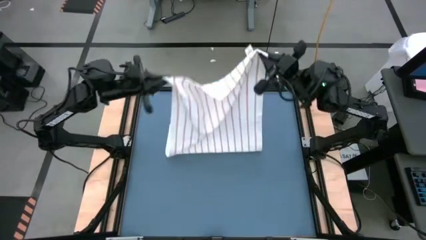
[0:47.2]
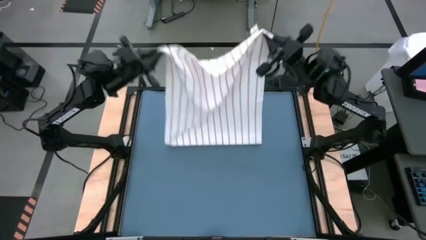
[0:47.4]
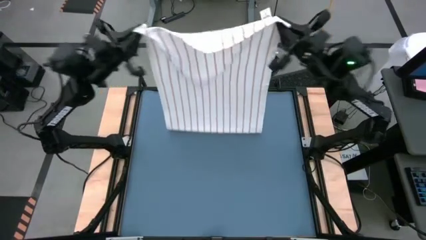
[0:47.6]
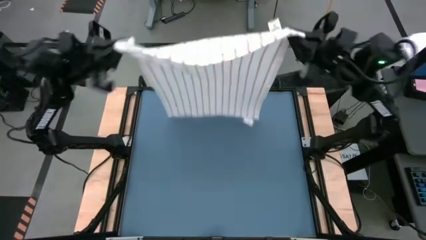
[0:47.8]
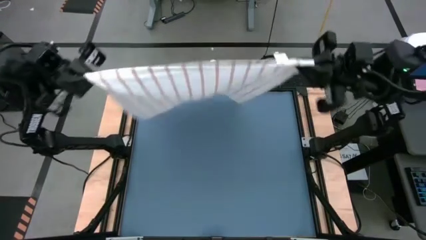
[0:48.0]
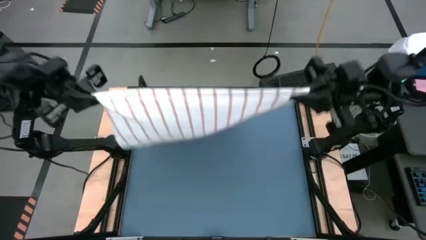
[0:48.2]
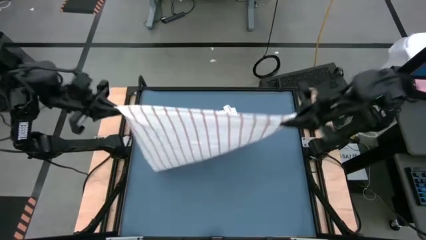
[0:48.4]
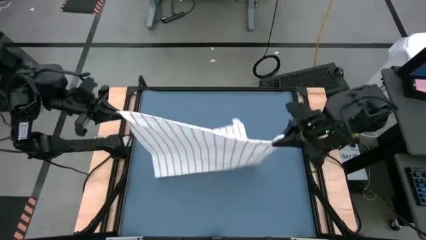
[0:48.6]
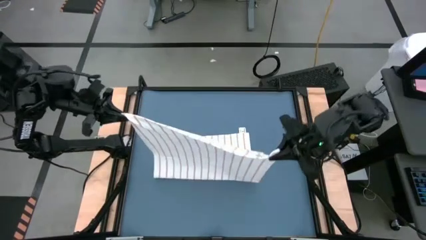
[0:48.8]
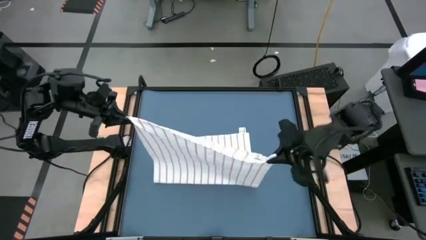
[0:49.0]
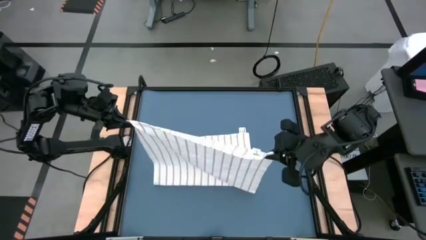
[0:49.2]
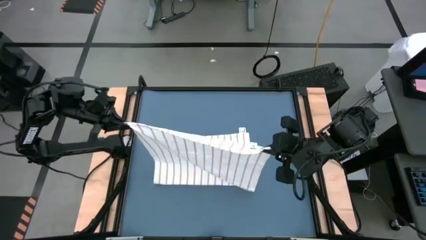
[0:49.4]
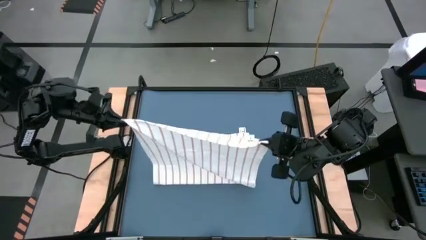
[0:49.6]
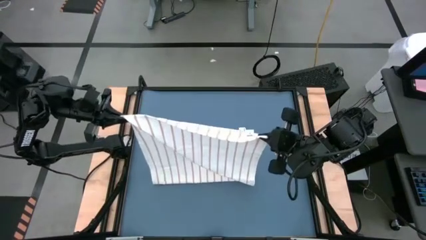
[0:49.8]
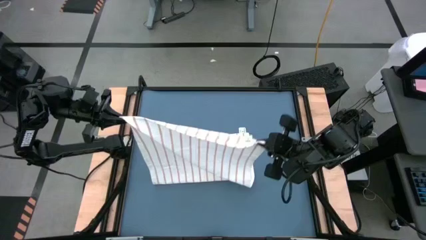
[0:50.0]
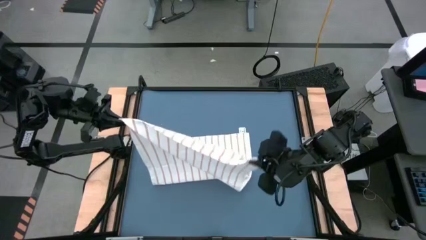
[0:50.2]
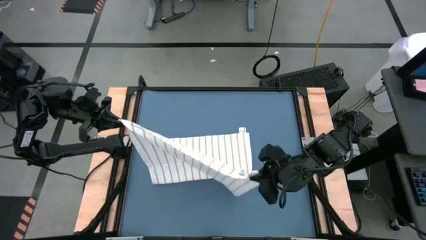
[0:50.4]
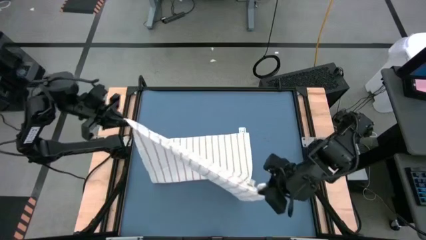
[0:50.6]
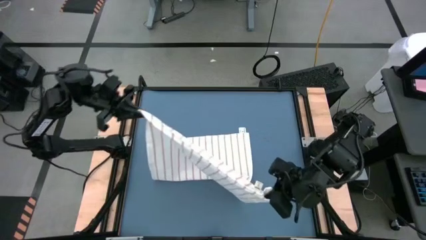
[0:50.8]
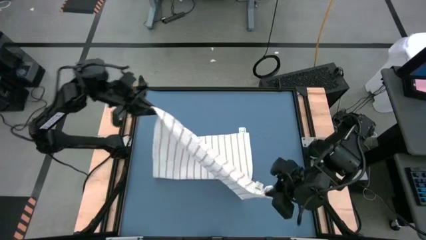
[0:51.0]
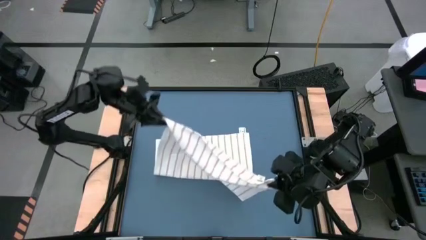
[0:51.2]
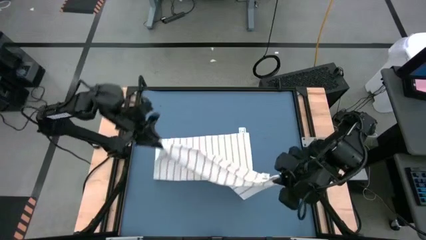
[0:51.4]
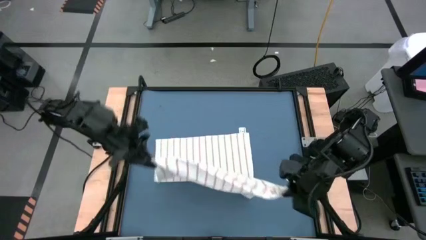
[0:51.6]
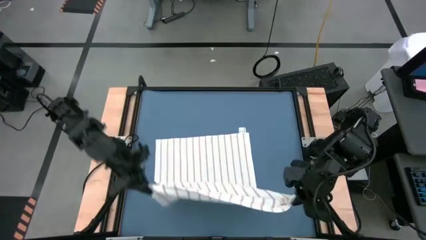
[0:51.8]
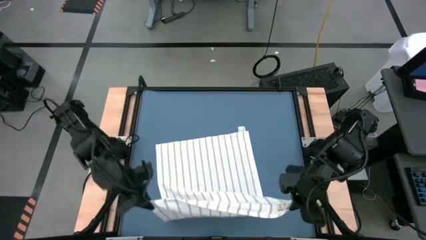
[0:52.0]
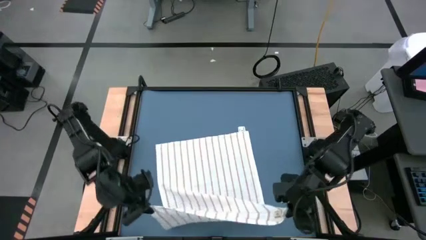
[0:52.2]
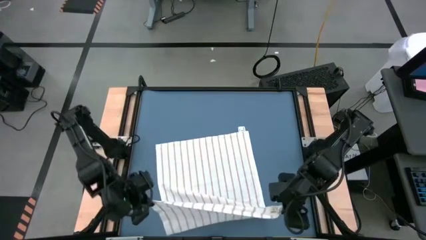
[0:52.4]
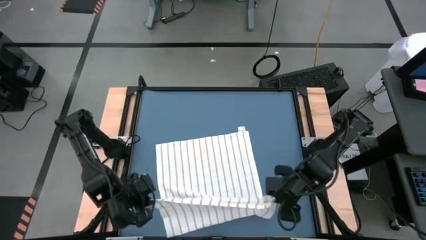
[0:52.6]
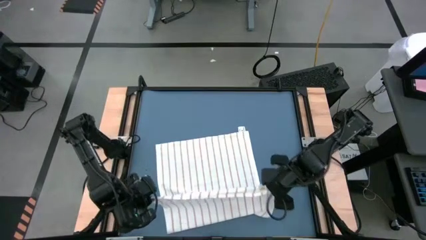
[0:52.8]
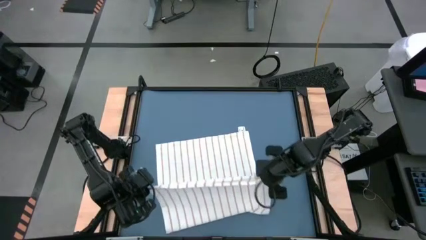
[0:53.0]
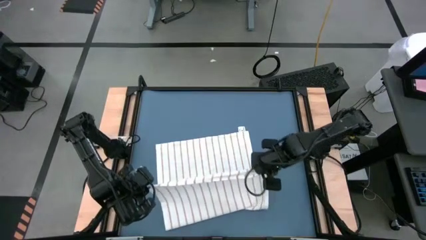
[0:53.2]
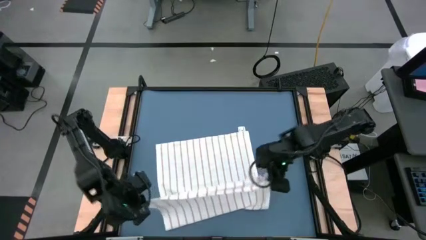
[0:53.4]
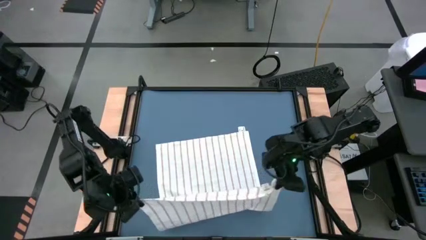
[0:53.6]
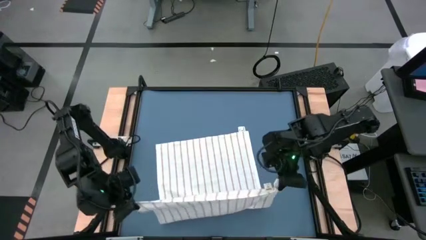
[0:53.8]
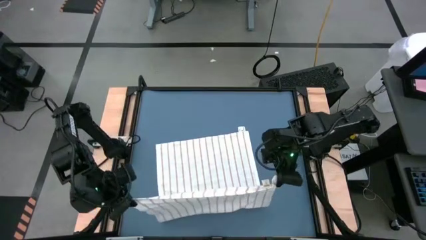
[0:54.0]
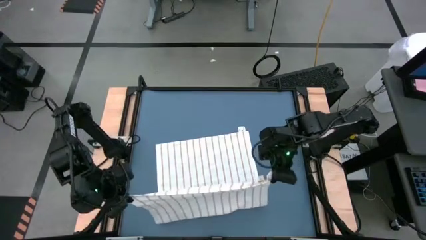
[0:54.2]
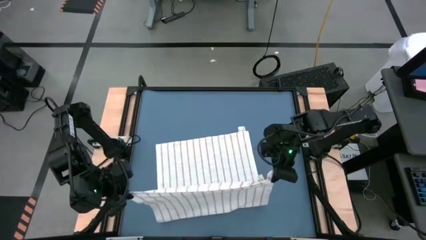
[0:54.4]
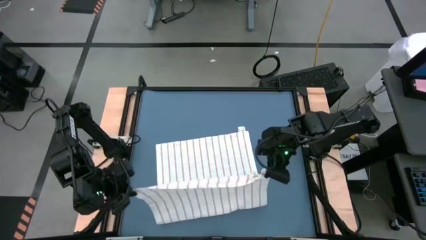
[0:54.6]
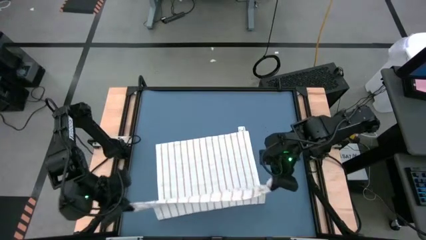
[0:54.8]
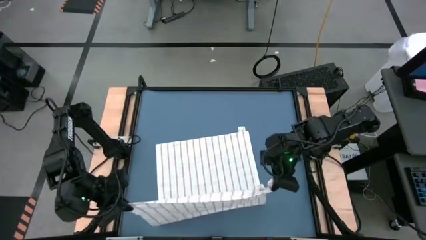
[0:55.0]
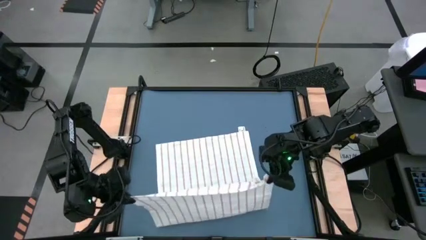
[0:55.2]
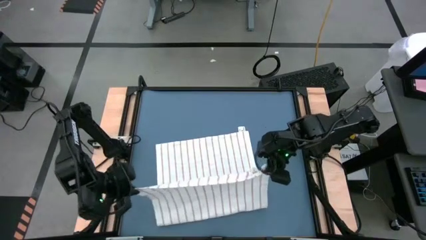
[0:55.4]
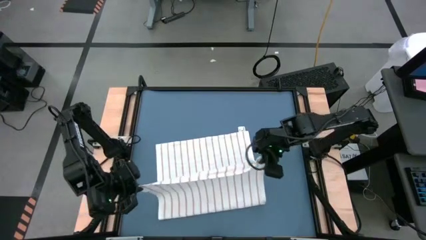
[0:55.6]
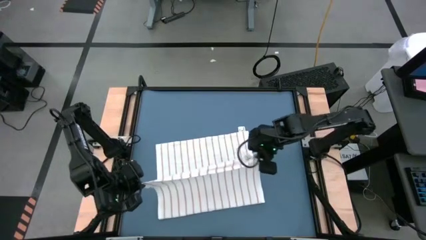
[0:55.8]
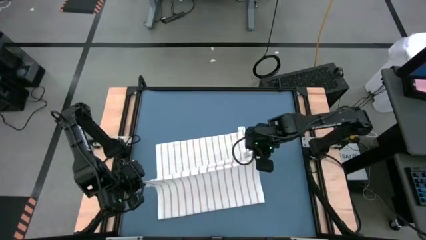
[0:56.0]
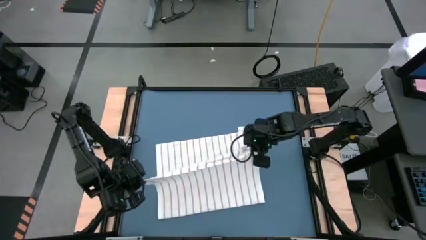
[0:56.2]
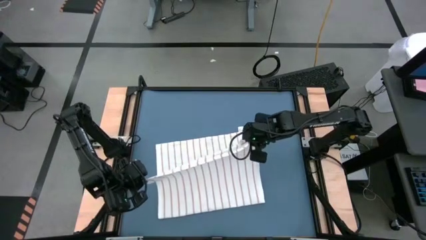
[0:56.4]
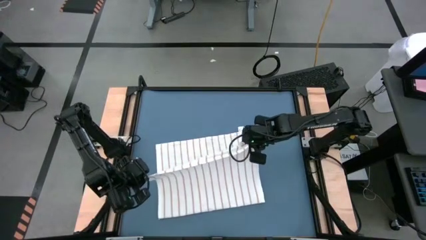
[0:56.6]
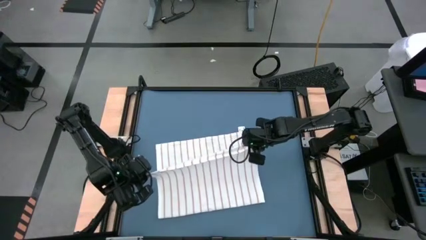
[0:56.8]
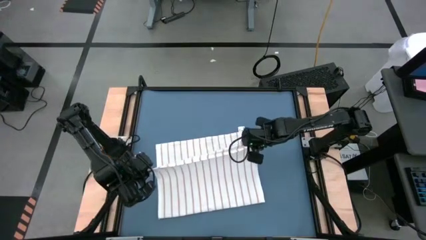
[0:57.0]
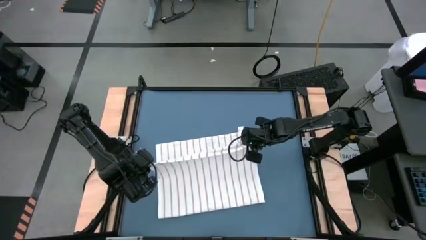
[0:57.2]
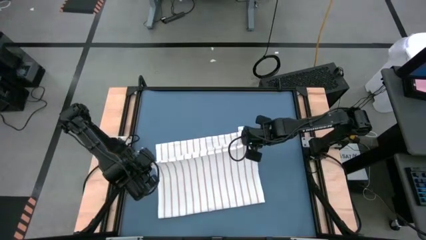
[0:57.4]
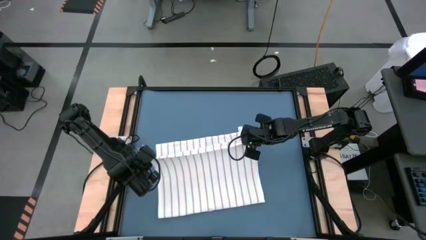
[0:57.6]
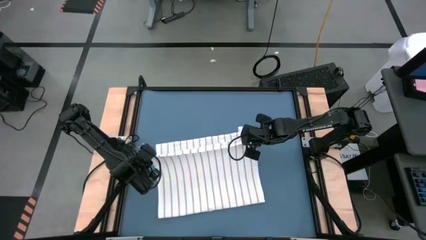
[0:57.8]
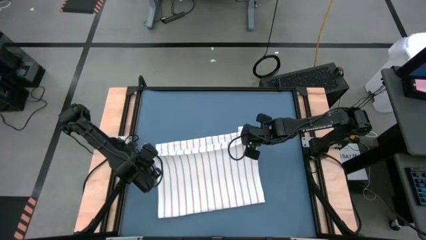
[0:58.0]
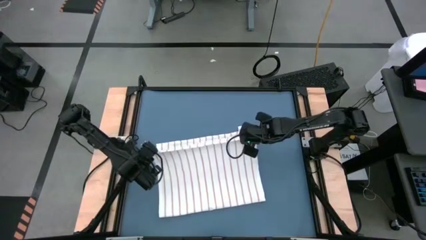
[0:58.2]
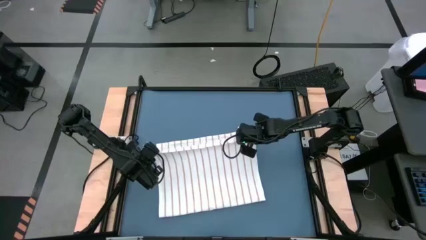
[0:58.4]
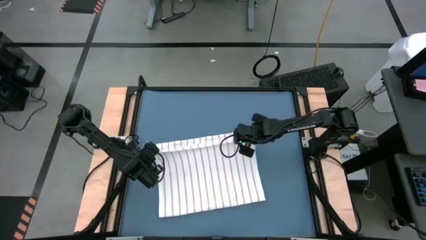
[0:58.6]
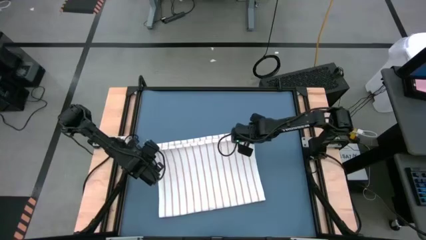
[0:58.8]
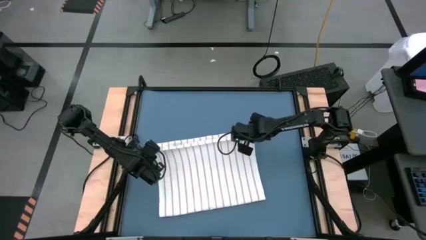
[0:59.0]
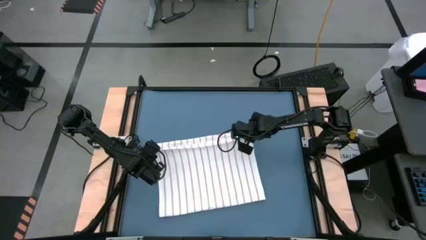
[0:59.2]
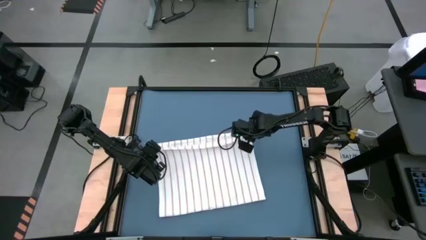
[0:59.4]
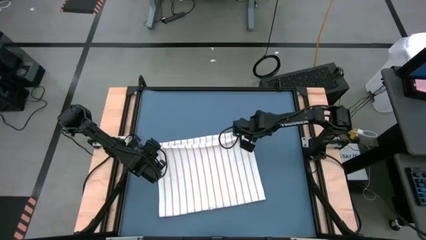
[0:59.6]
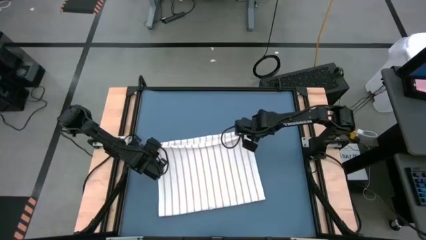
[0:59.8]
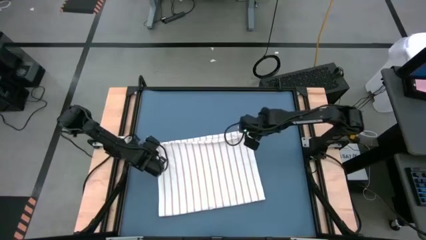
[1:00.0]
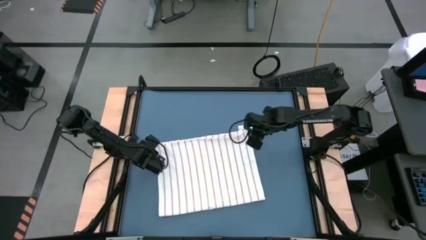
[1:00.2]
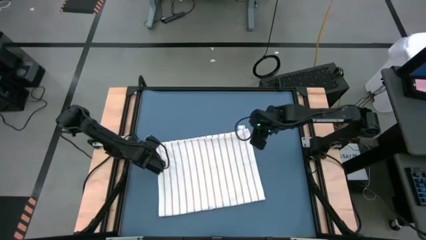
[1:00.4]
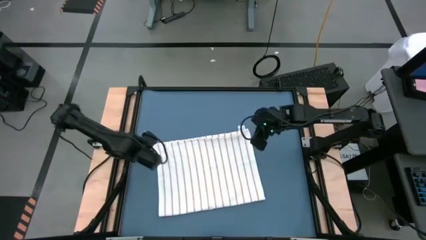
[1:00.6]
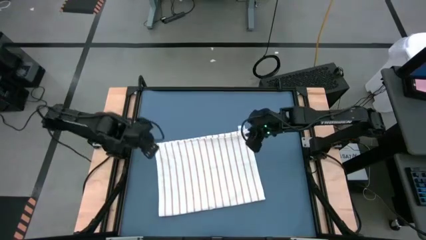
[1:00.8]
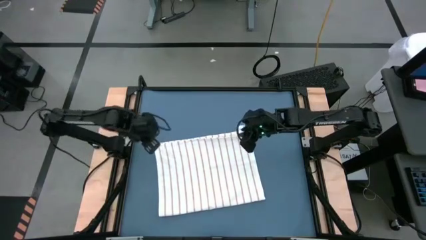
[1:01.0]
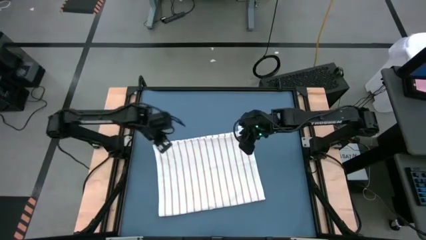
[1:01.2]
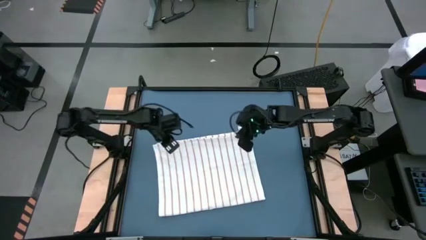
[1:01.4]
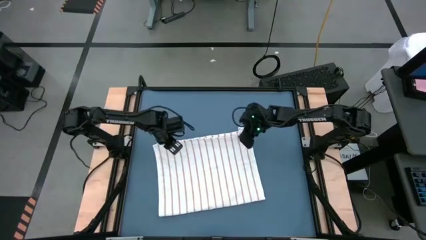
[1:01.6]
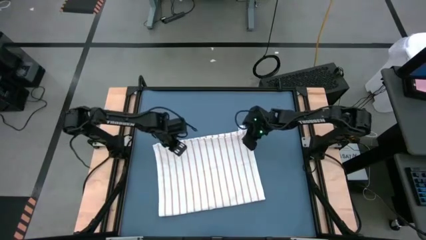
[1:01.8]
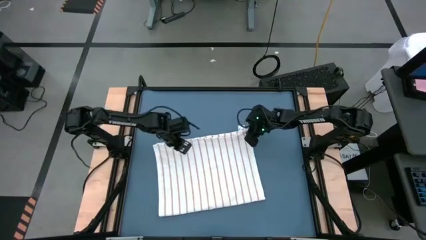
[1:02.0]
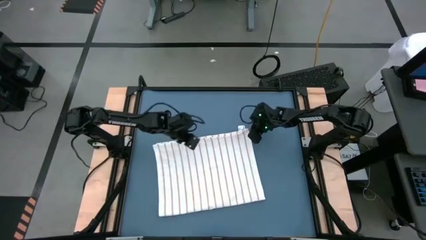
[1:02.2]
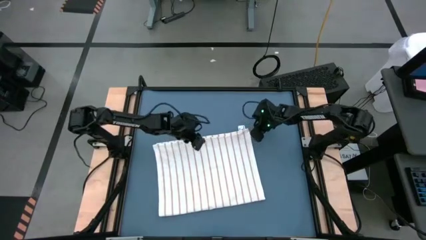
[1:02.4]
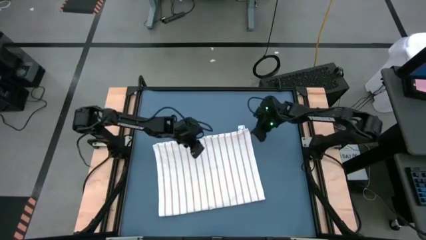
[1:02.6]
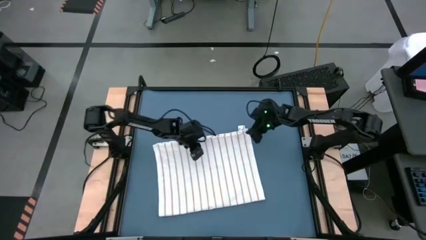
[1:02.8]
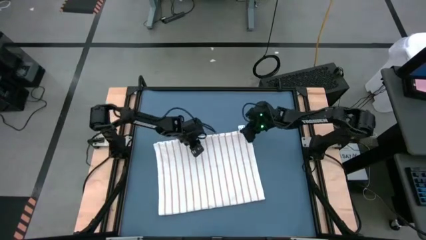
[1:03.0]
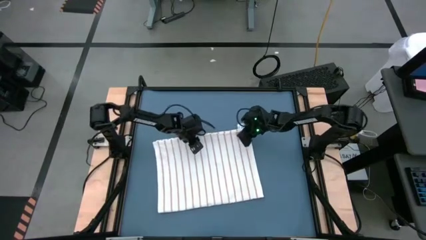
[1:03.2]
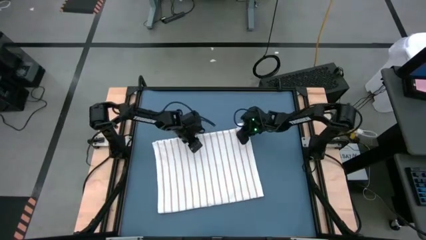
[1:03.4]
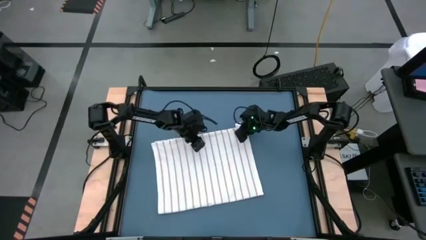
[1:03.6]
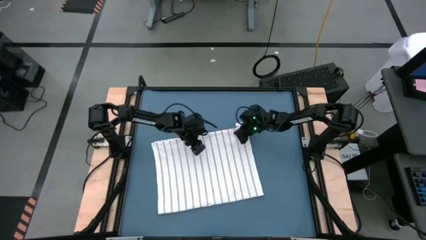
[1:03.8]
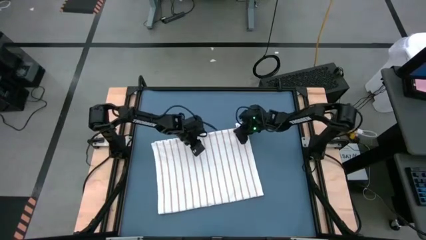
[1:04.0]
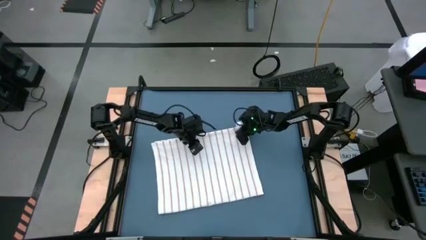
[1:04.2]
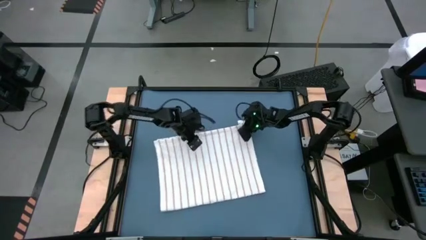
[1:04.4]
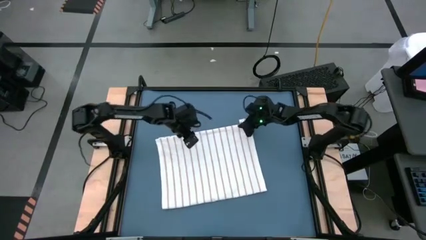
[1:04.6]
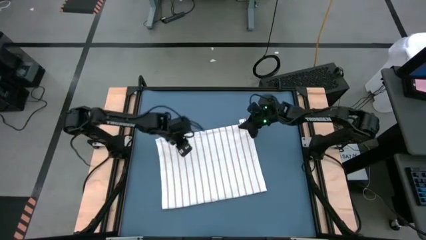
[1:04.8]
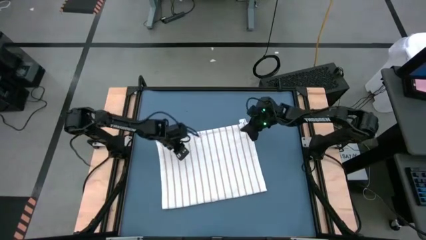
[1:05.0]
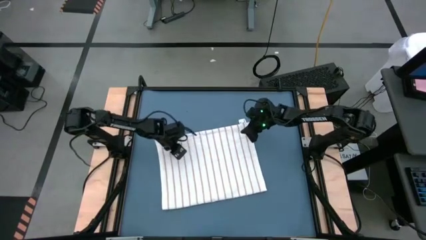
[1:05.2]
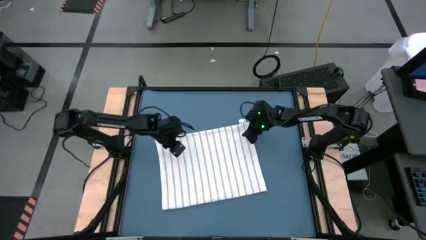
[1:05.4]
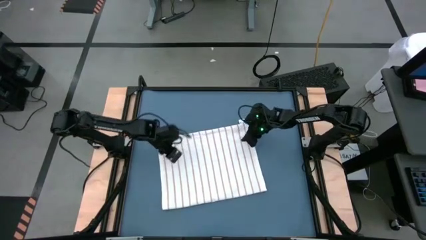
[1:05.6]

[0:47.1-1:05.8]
Task: Roll towel
Fold the white towel
